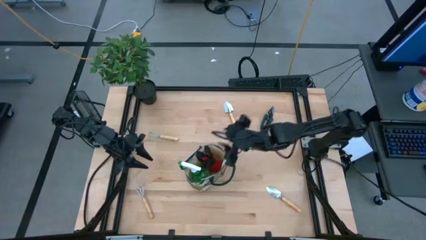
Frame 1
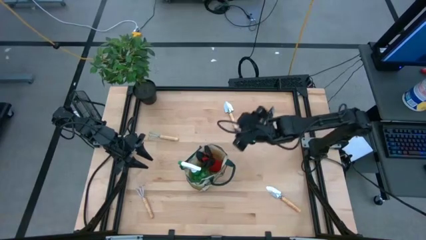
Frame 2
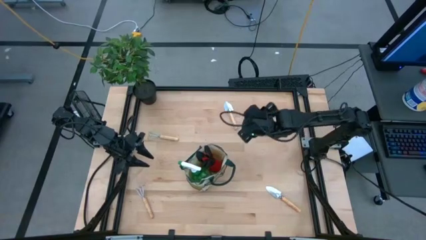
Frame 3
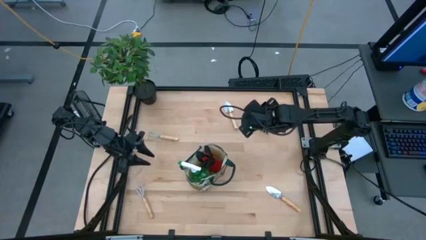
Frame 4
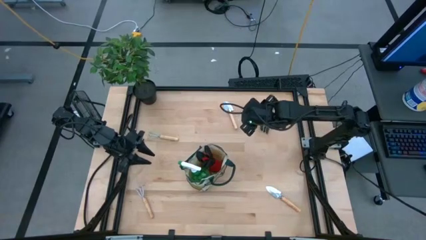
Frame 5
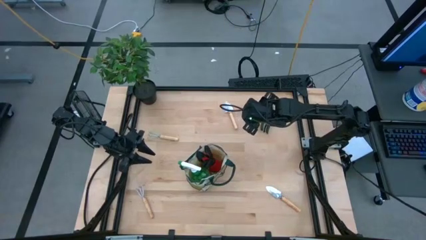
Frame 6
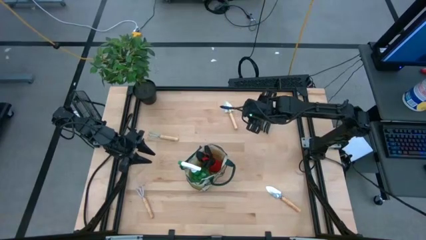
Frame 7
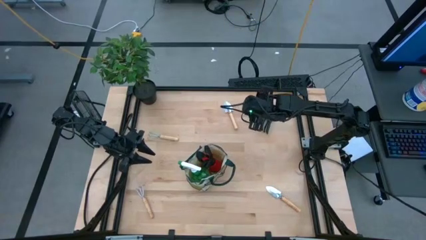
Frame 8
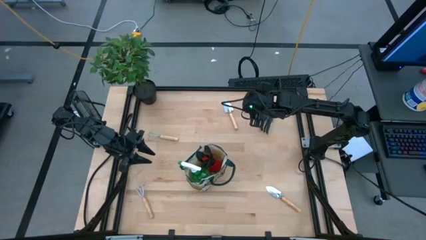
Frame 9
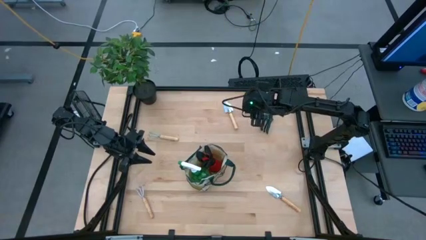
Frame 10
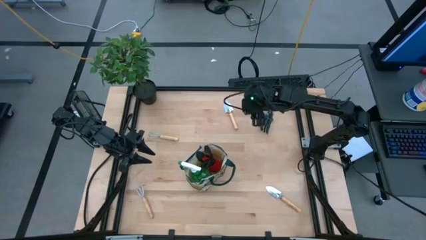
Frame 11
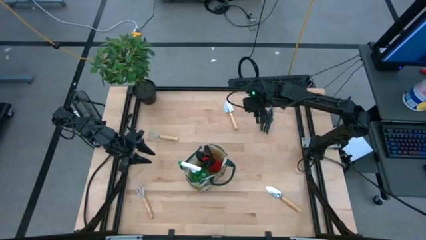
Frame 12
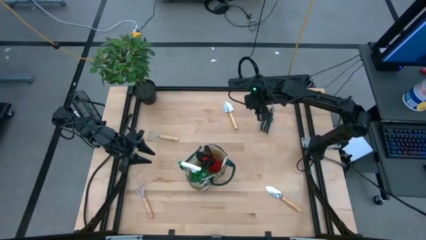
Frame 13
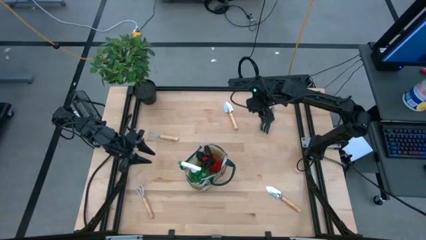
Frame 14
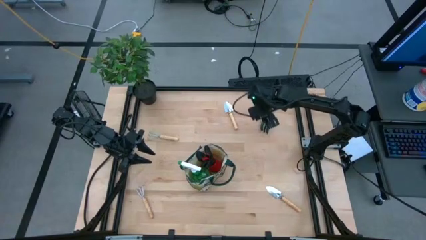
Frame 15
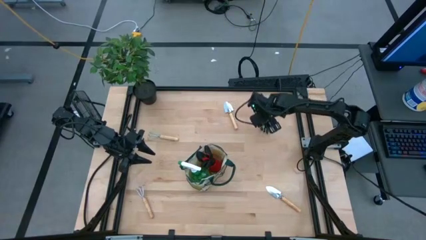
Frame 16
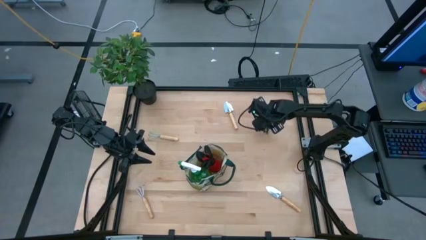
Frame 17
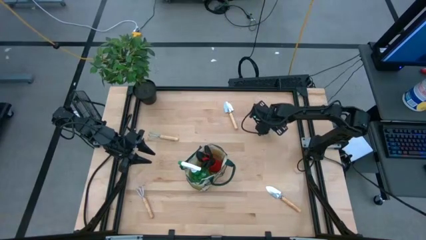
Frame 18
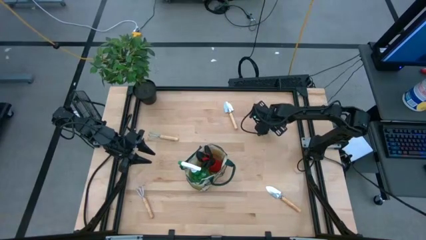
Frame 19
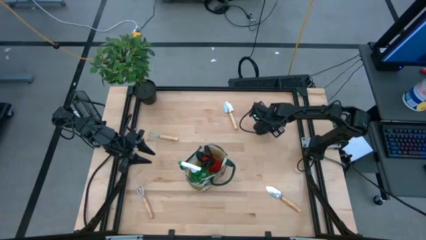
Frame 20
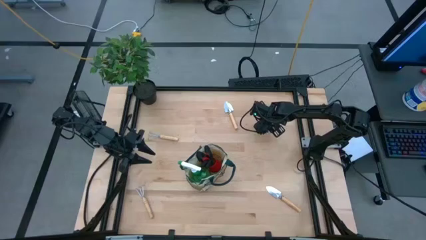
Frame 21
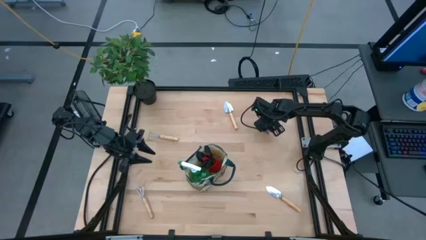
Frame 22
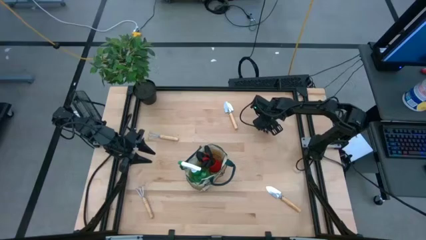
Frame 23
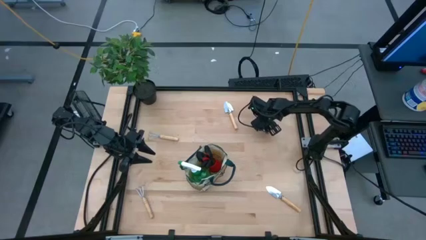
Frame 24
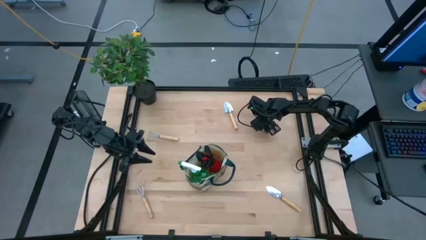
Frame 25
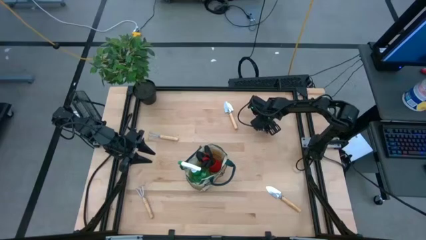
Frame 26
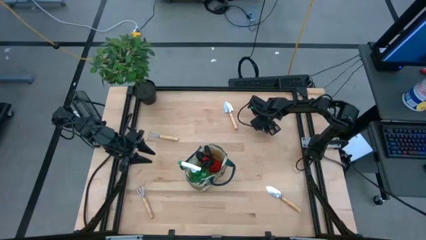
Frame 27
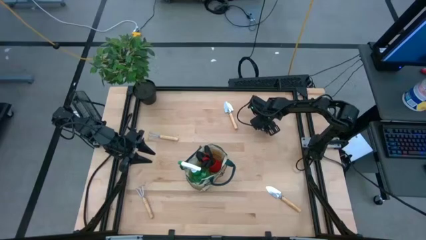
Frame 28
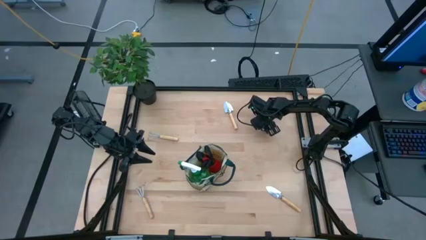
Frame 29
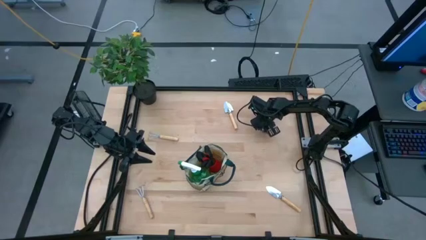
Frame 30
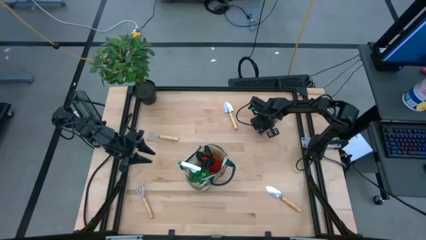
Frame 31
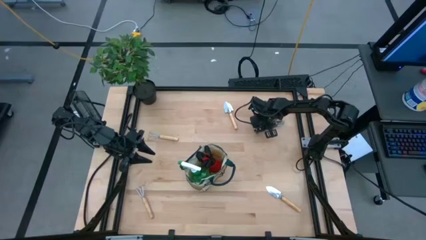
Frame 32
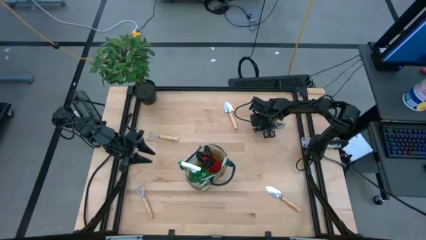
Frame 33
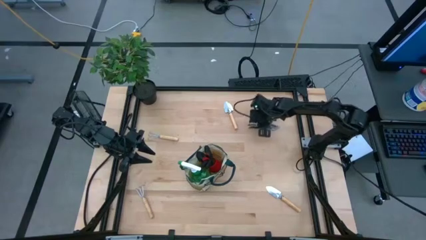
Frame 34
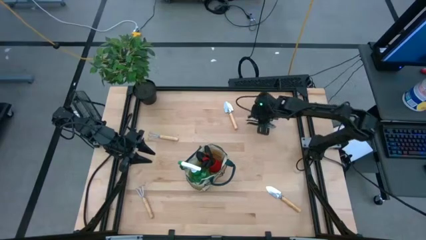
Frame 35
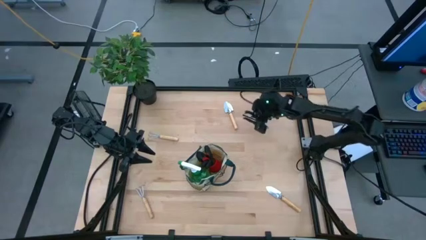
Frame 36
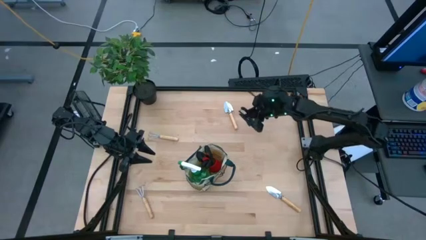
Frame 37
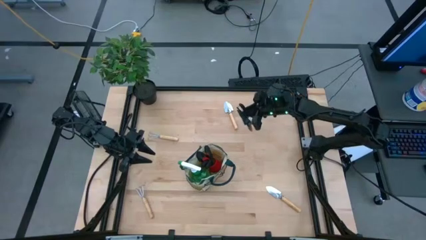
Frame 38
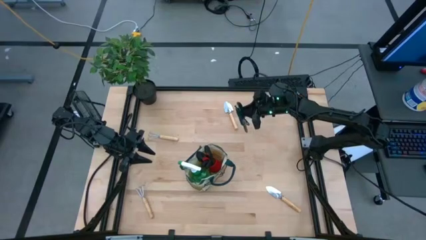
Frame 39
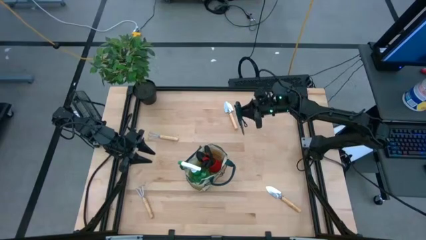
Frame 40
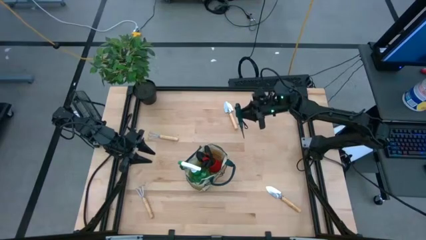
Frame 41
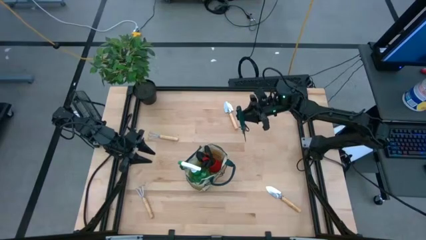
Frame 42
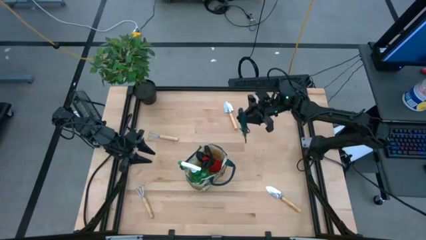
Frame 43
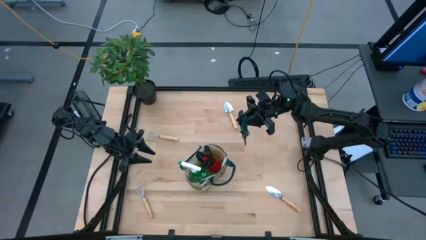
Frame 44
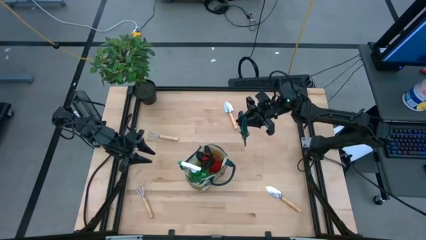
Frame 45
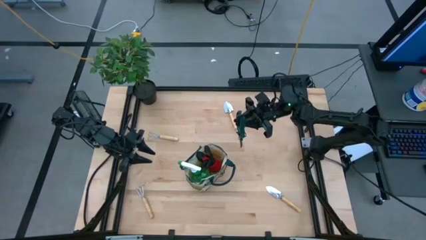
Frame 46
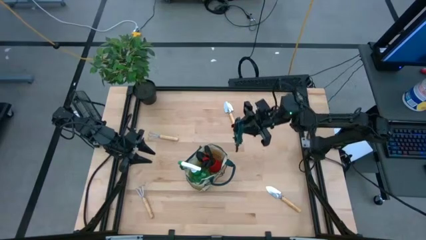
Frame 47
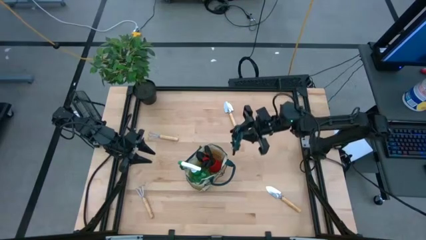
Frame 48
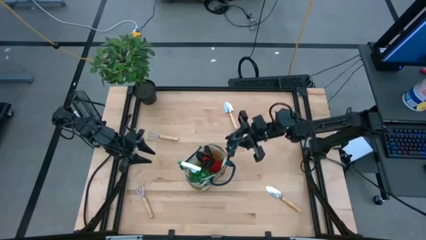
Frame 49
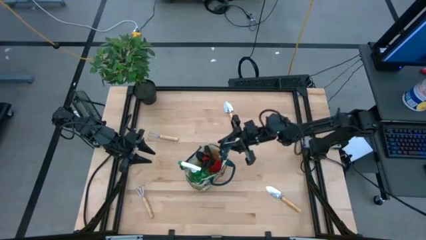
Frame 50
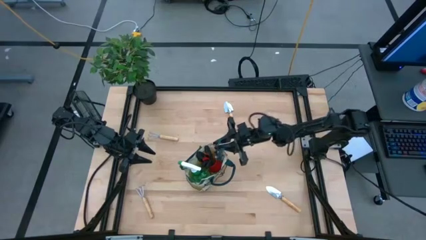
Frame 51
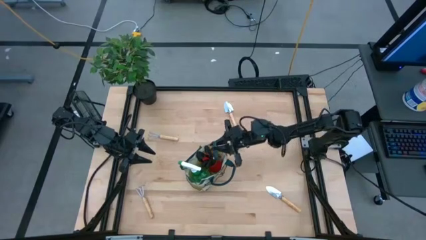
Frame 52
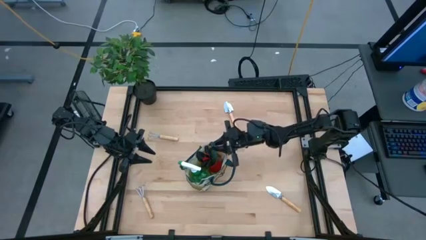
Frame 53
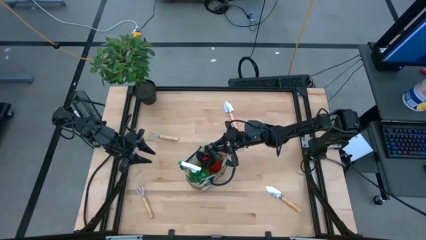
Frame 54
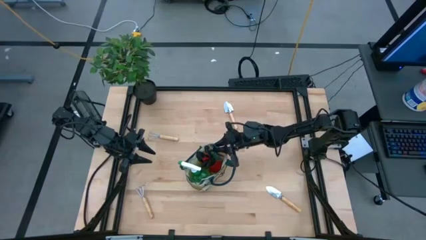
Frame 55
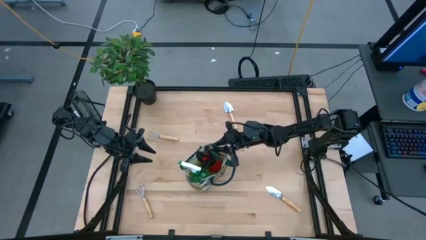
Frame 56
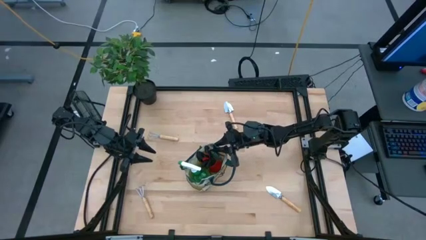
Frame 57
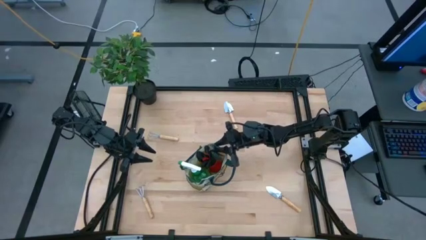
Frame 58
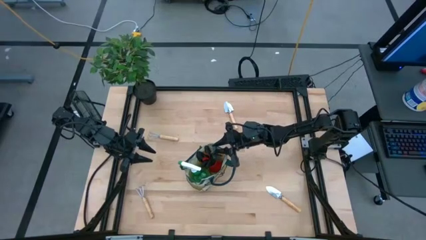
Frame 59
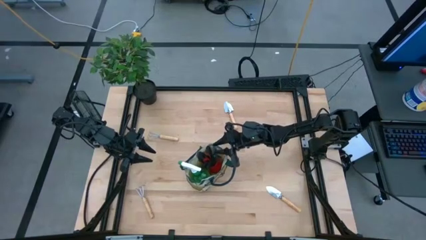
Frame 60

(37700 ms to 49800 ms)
Task: Pick & Place Garden tools in Gardening bag
Put the shear scissors into the gardening bag

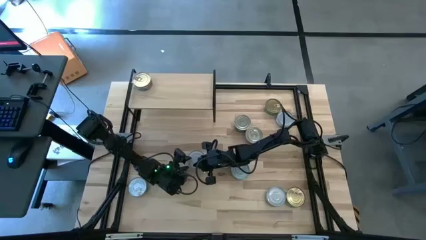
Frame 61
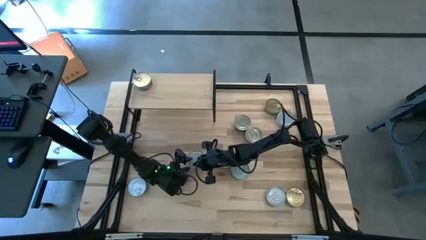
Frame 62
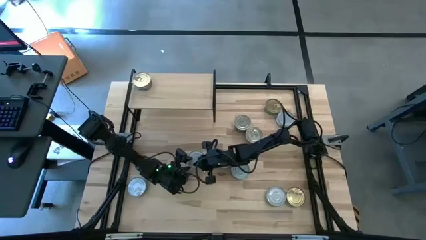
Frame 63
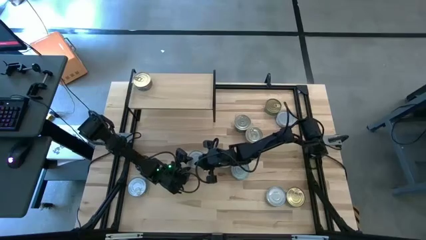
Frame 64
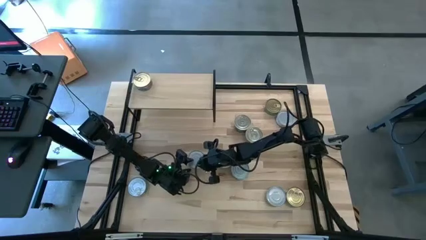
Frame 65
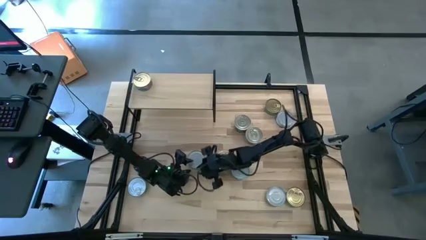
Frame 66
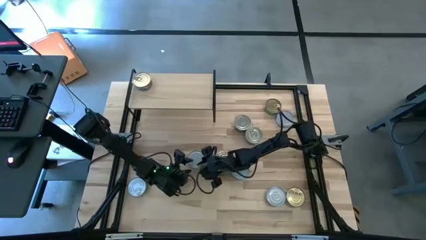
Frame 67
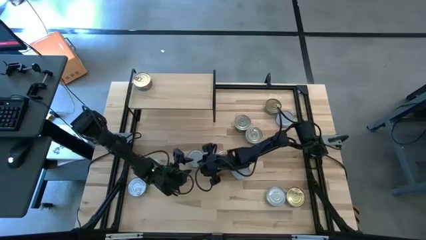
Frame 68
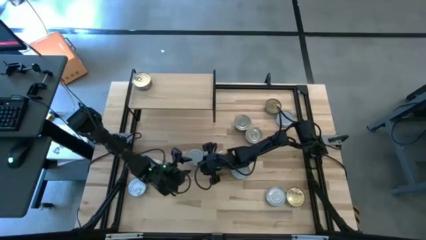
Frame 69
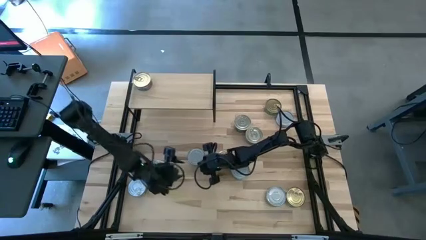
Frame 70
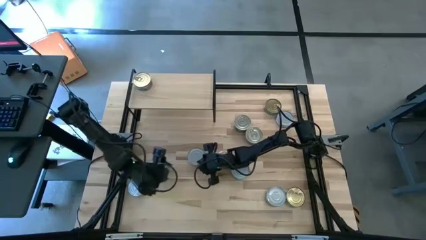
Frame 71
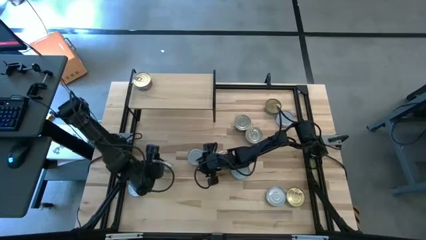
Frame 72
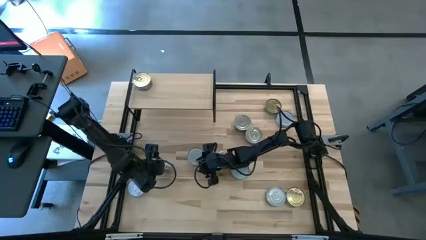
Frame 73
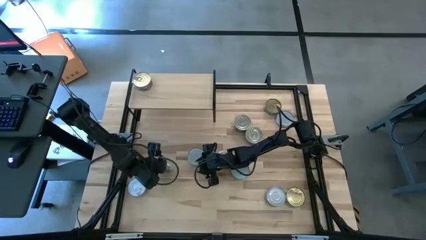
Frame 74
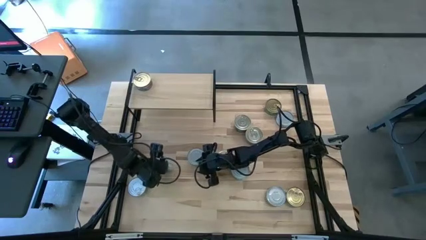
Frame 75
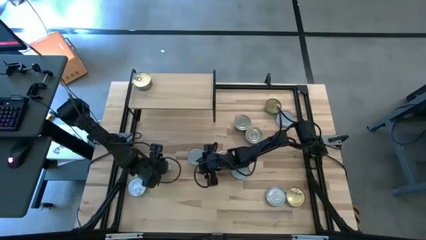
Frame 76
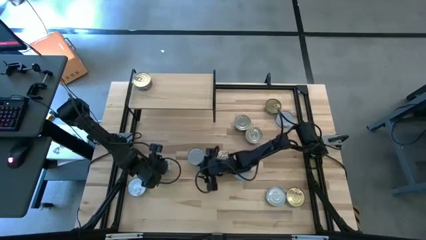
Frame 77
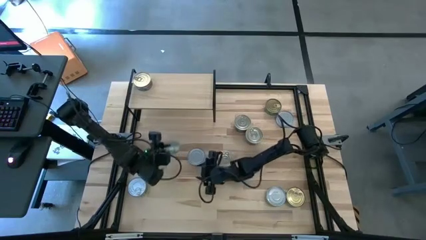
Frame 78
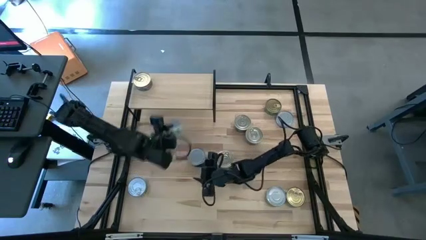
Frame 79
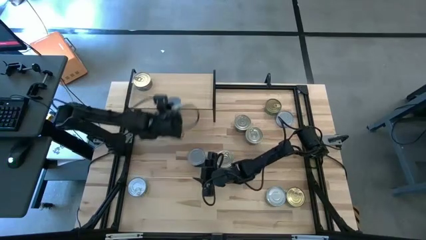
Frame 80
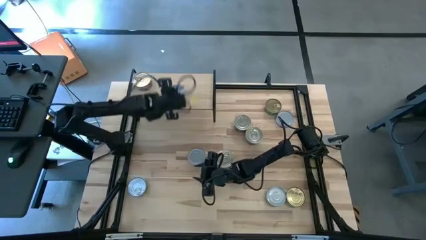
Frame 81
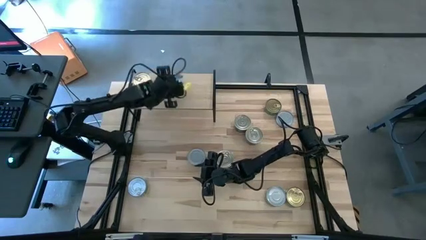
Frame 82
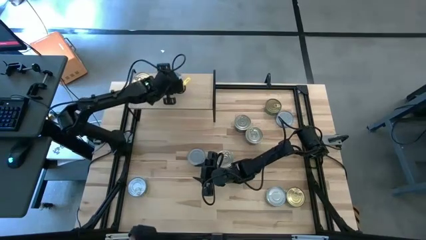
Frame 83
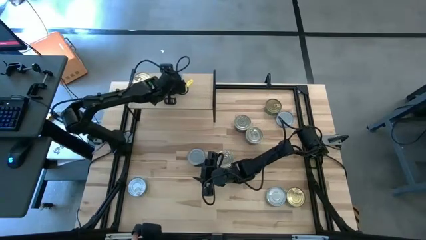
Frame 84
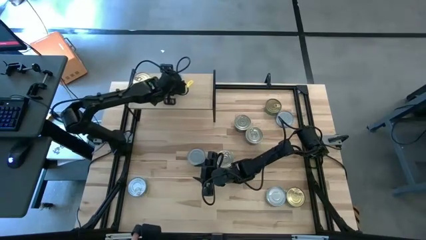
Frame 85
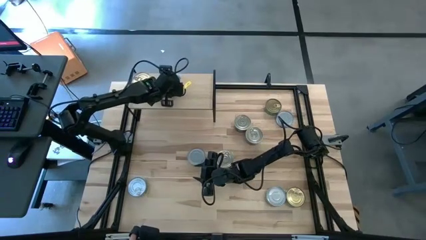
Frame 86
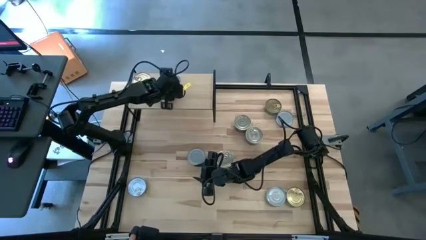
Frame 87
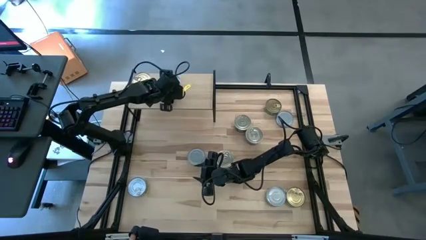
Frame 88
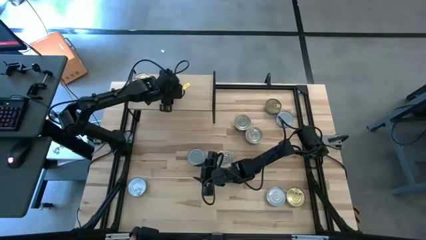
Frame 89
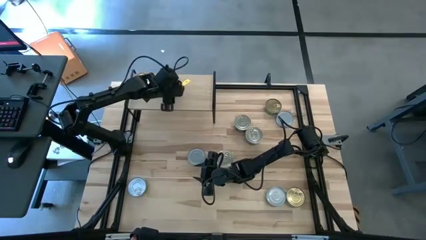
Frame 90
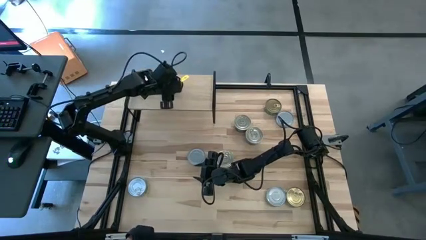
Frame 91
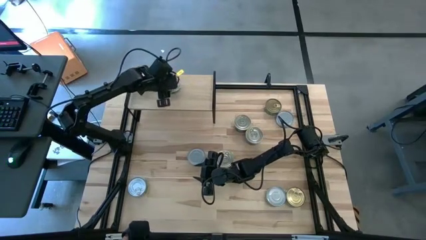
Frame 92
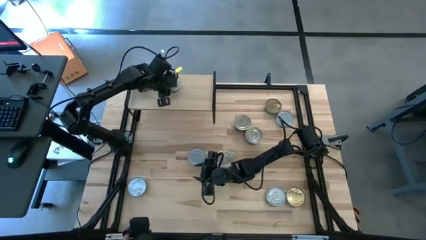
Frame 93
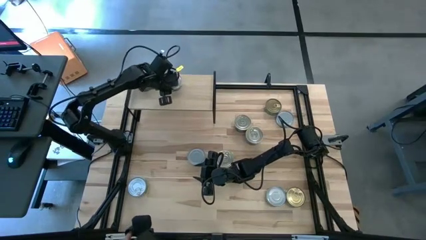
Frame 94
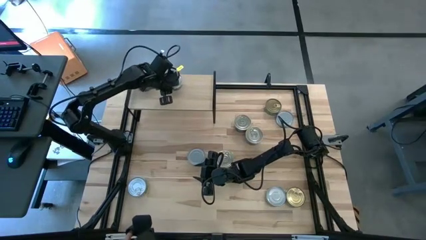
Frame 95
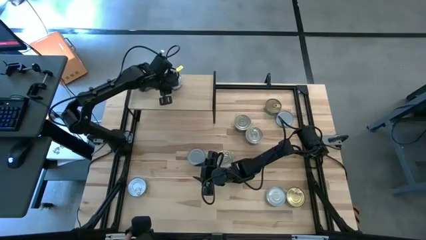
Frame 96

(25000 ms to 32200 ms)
Task: Stack canned seafood by type on shelf
Put the green white tuna can on the shelf
